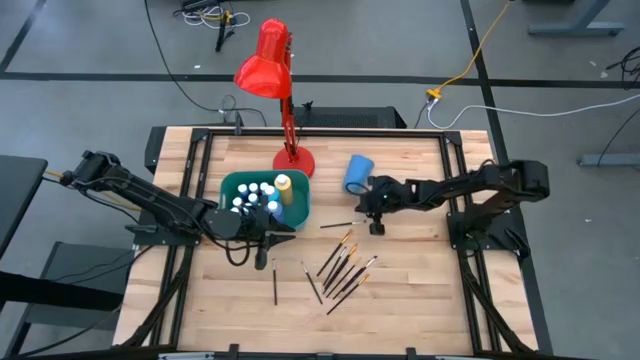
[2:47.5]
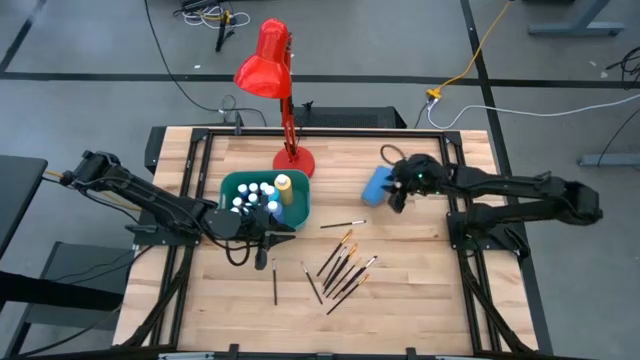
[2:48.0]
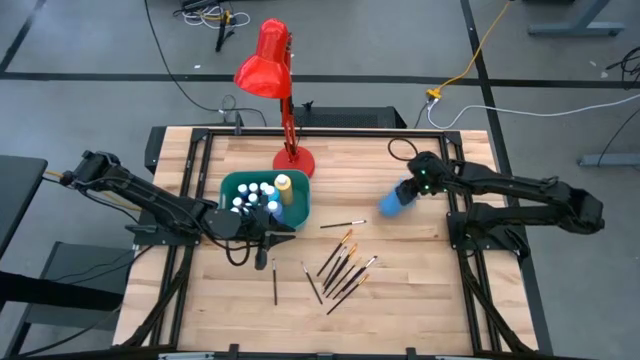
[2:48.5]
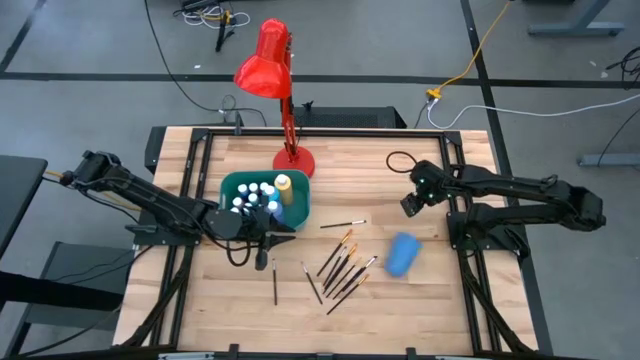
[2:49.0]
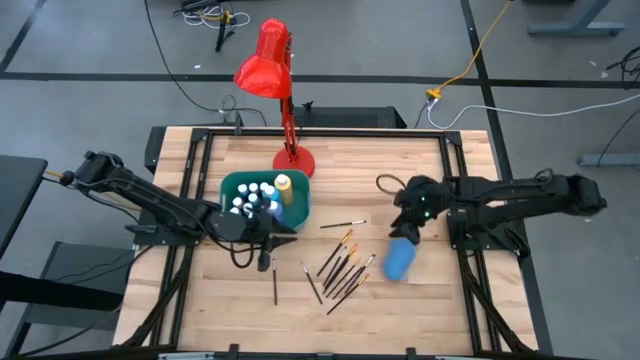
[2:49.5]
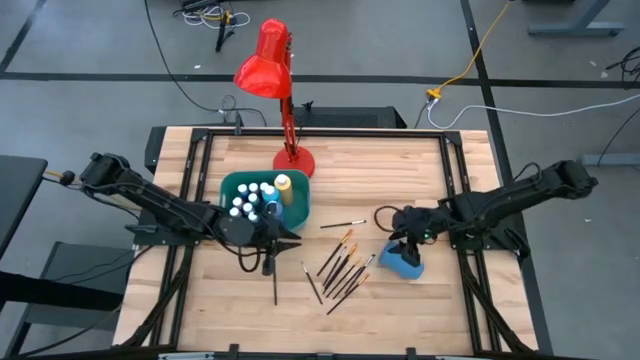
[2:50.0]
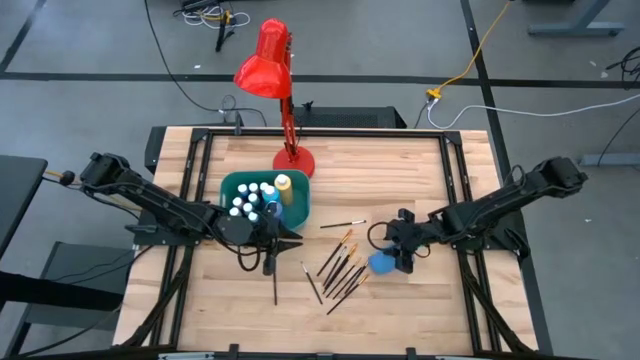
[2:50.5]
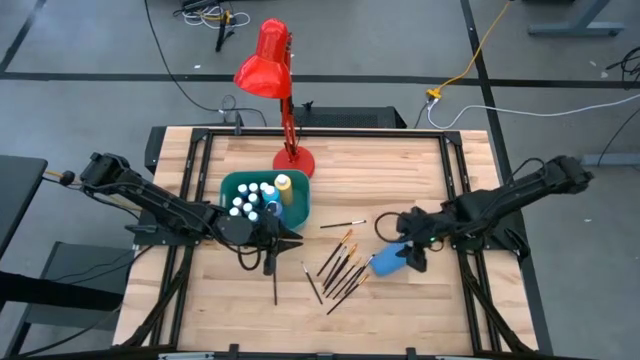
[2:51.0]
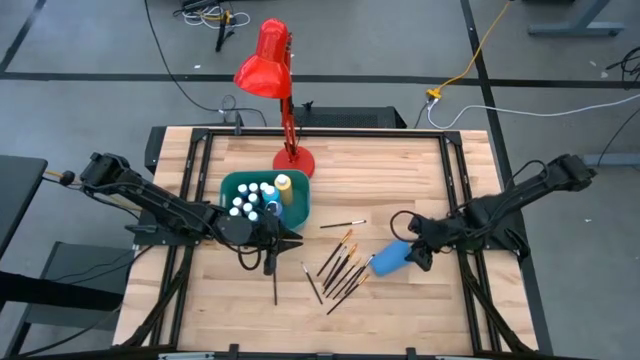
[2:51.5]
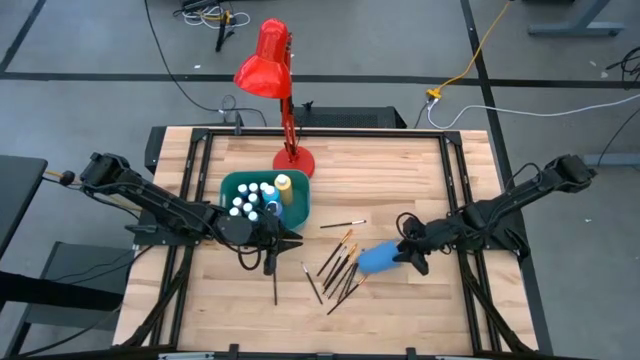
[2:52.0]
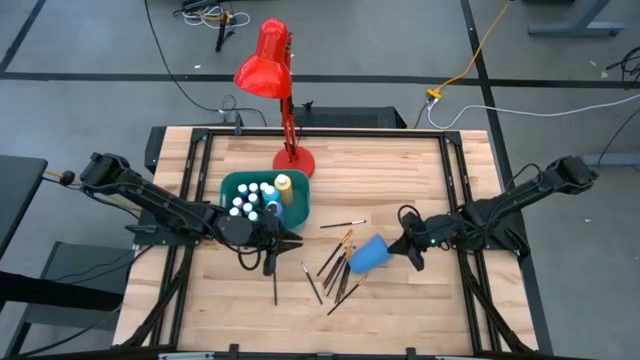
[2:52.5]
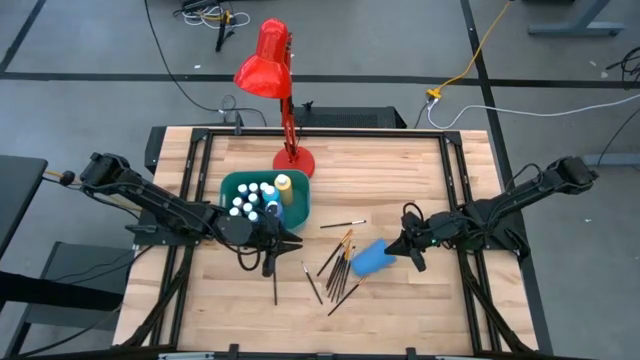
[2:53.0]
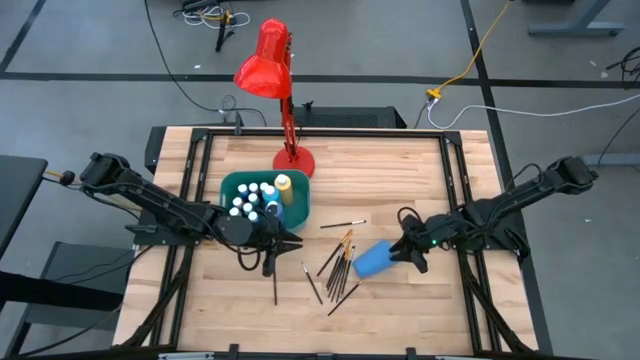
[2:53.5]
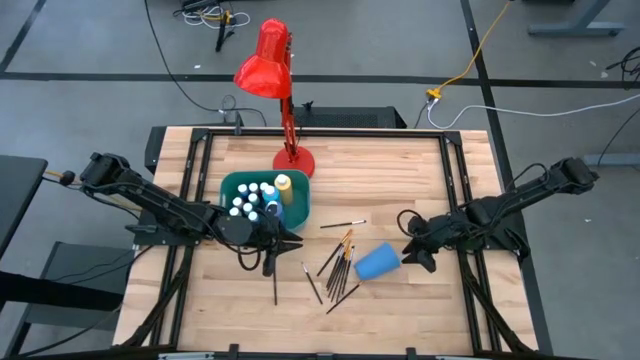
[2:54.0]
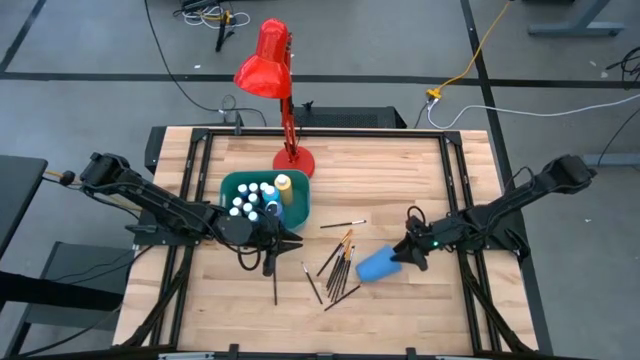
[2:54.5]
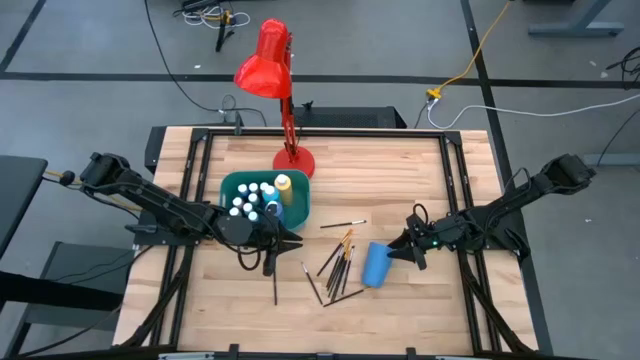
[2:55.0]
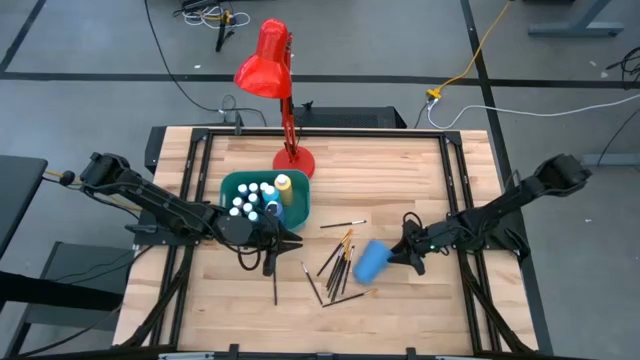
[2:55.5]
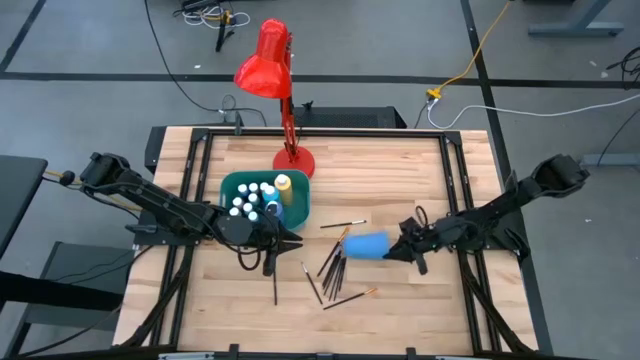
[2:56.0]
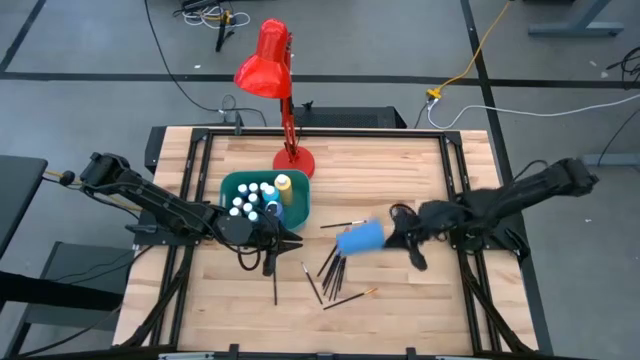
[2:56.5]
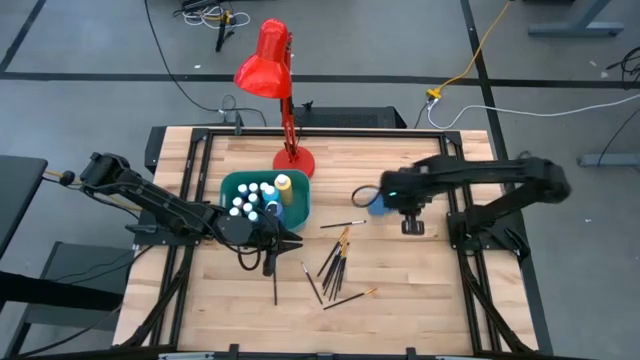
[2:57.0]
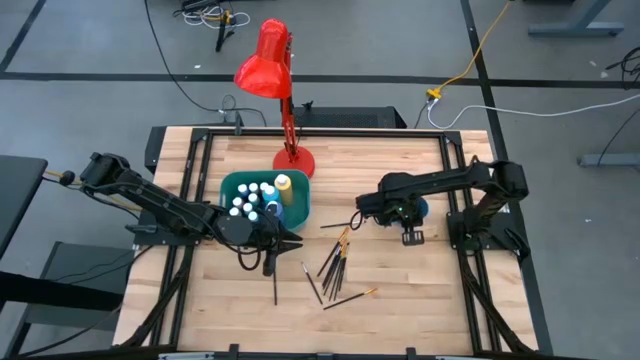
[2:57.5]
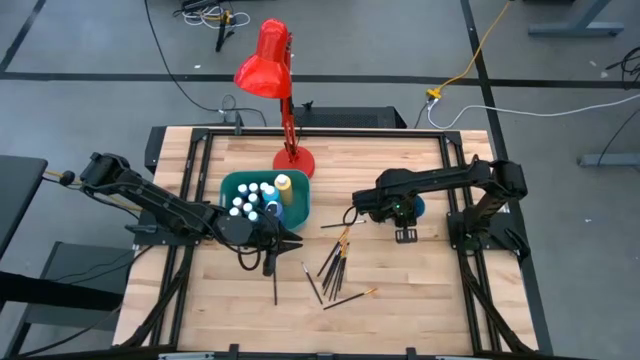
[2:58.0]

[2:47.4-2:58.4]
Task: Pick & Place Paint Supplies
Prepare the blue cup on the table

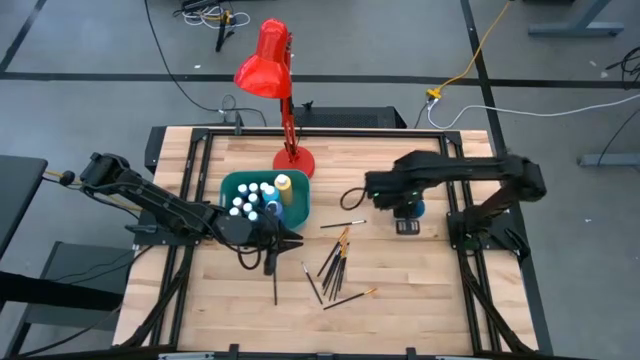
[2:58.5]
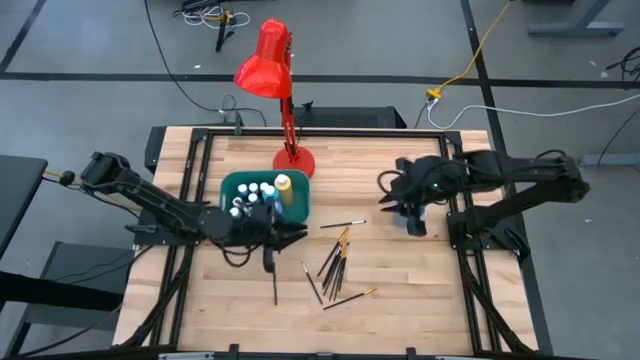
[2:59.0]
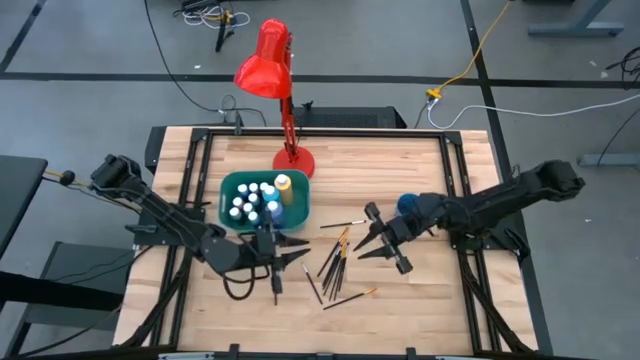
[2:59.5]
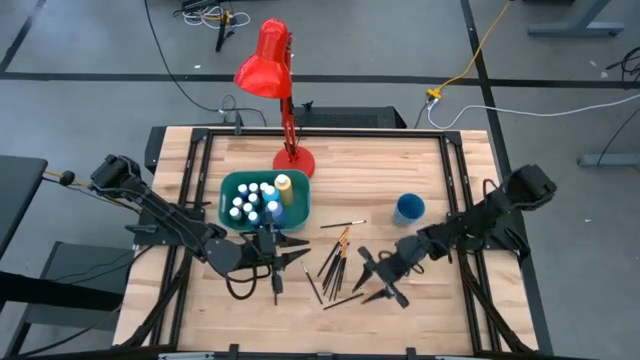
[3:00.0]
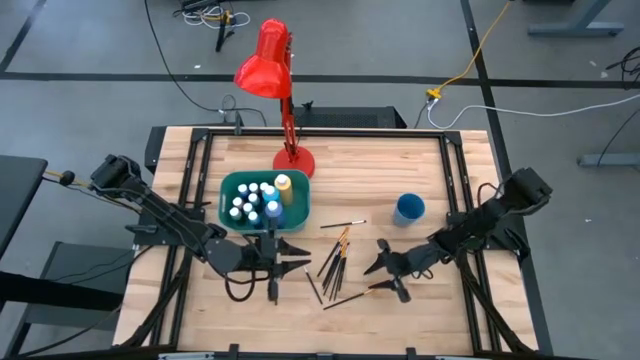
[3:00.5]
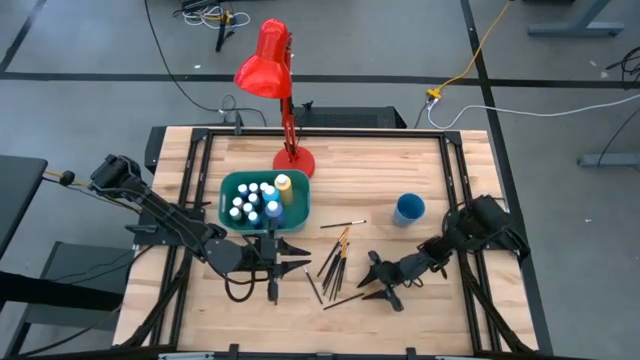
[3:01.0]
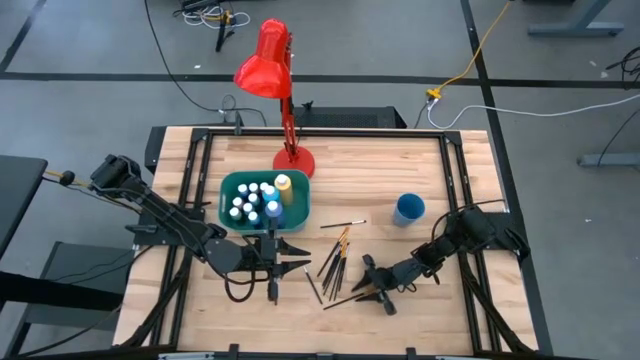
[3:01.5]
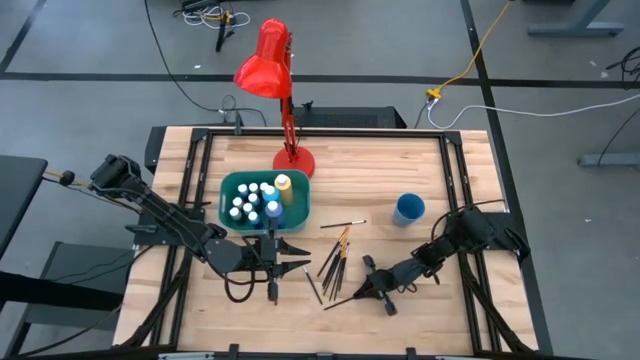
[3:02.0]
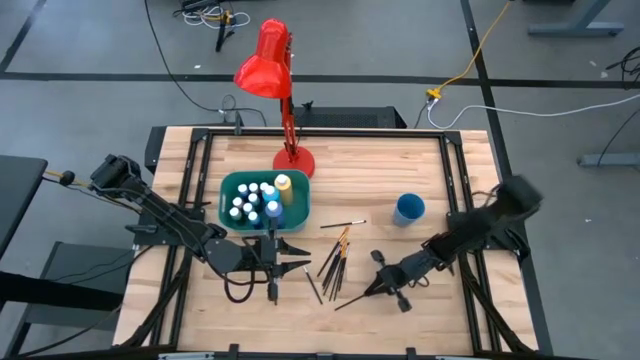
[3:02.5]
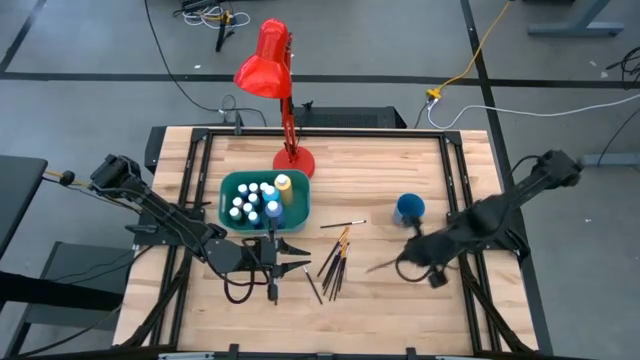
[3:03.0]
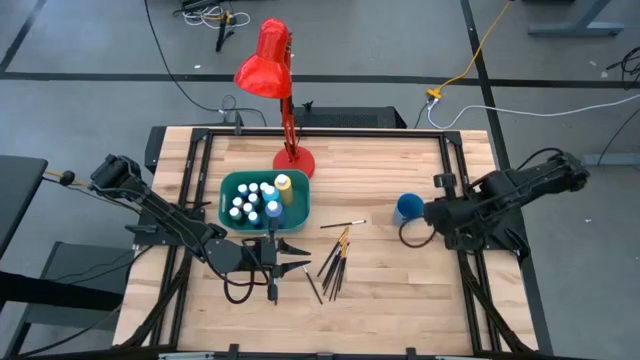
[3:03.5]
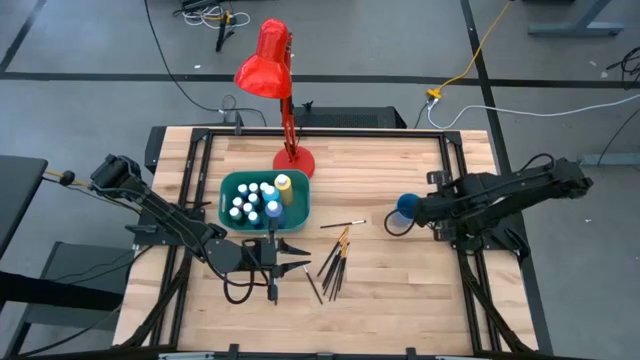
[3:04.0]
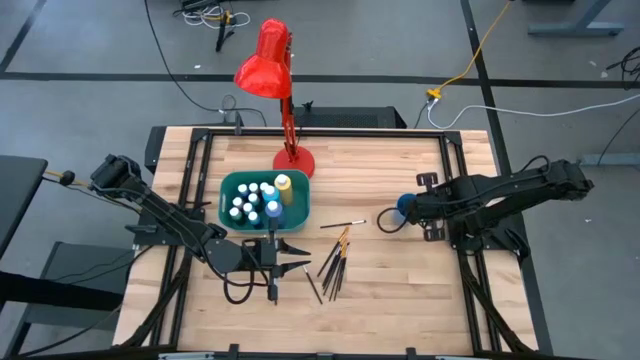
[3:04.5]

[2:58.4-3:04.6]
Put the black gold paint brush into the blue cup

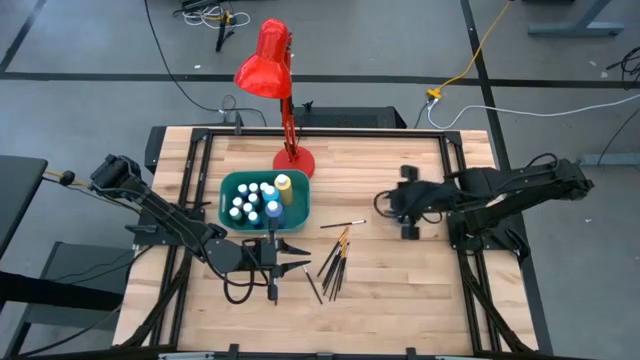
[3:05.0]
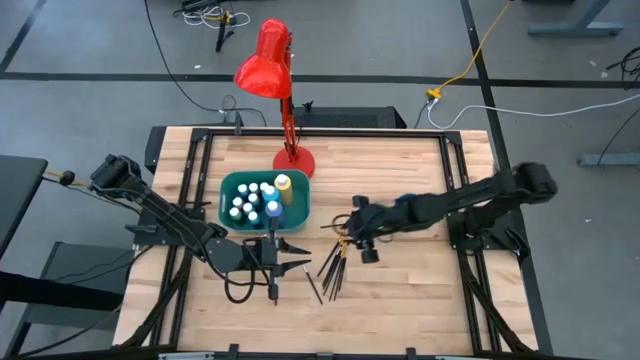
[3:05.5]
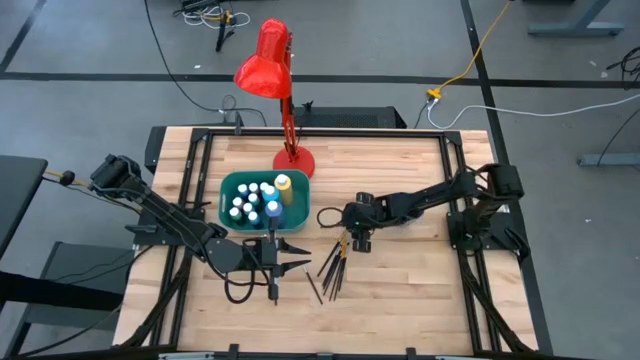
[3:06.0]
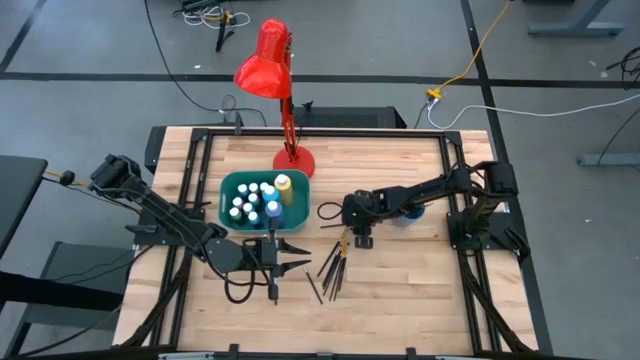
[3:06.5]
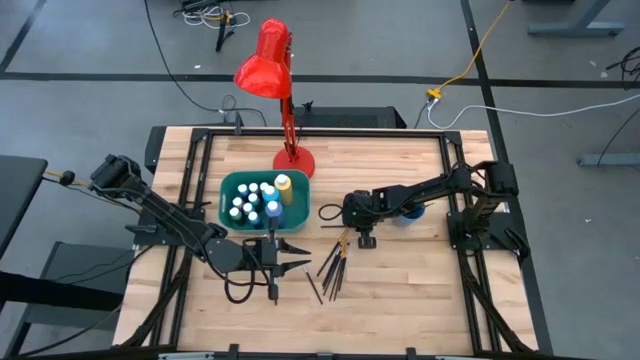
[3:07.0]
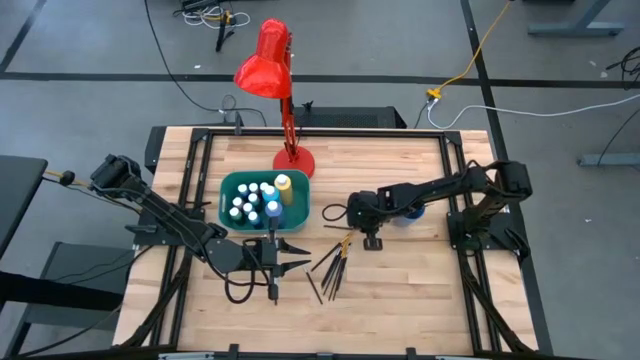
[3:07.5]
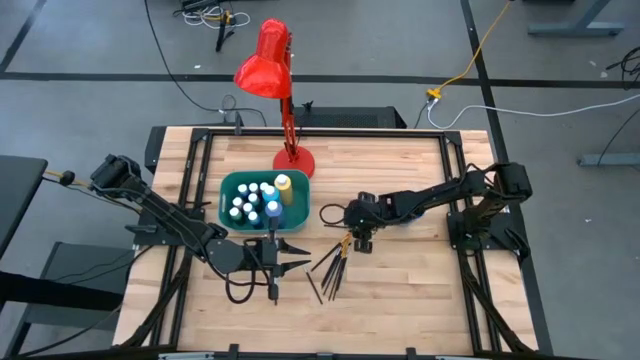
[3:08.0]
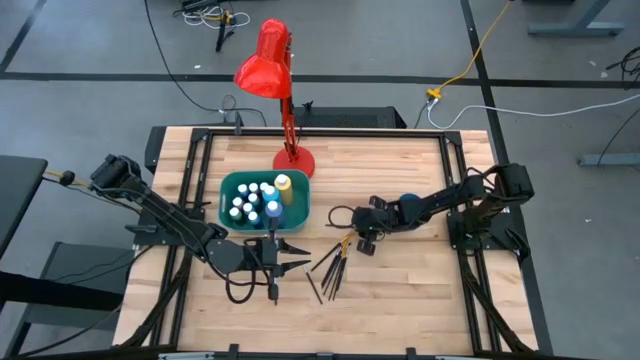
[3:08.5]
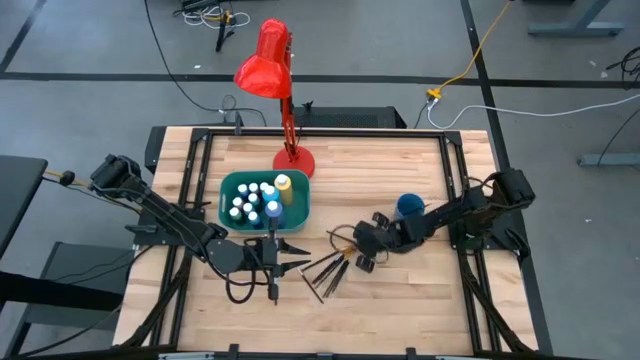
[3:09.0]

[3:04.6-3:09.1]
Put the black silver paint brush into the blue cup
